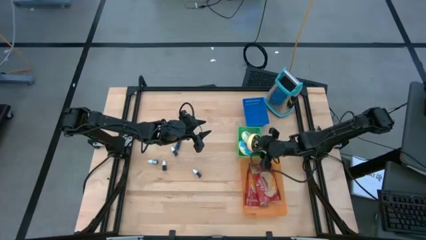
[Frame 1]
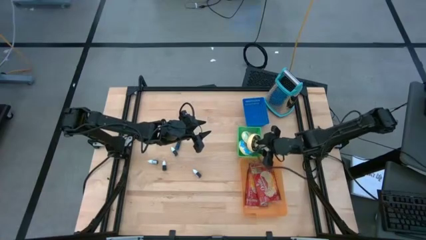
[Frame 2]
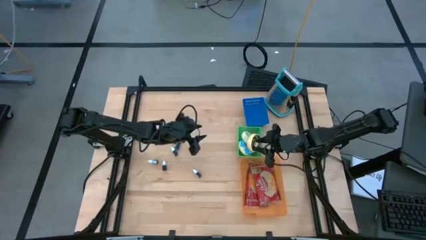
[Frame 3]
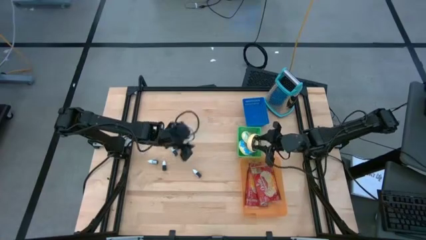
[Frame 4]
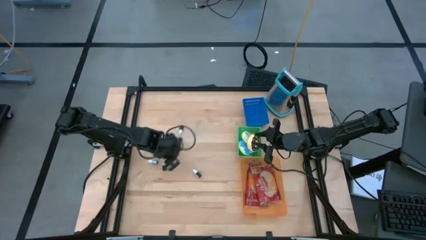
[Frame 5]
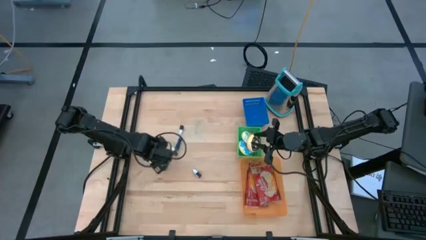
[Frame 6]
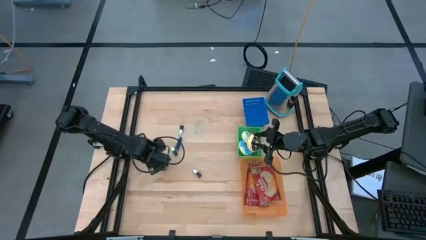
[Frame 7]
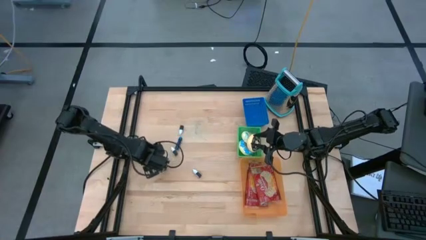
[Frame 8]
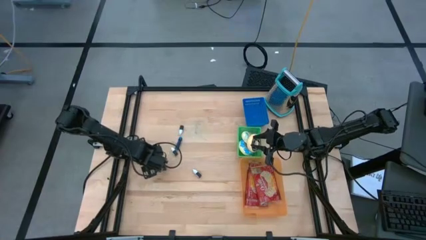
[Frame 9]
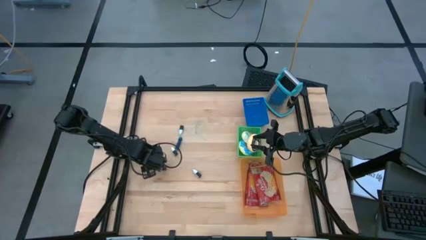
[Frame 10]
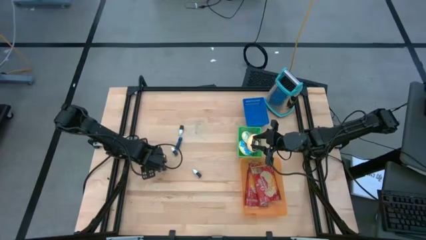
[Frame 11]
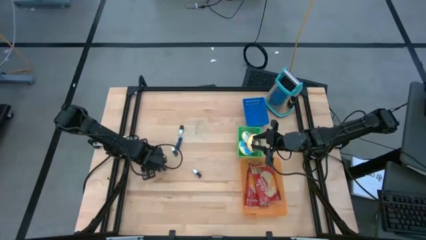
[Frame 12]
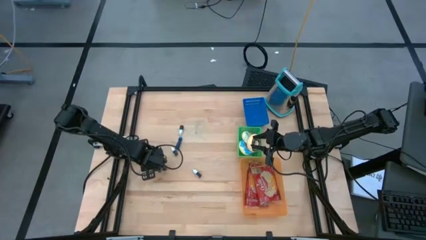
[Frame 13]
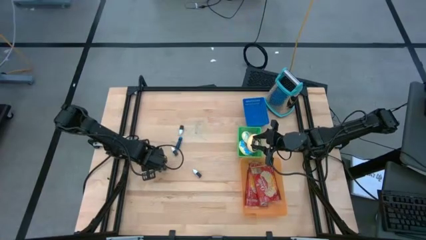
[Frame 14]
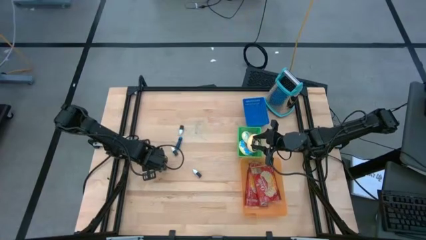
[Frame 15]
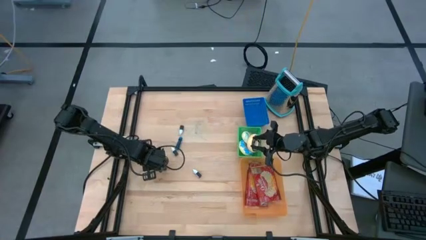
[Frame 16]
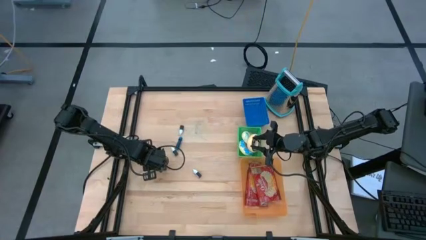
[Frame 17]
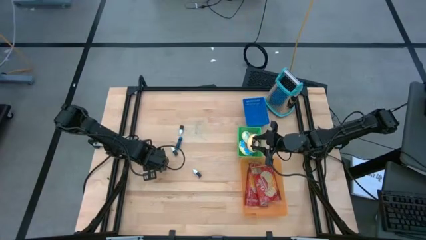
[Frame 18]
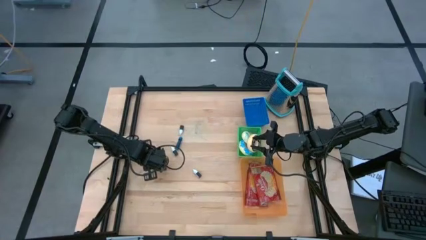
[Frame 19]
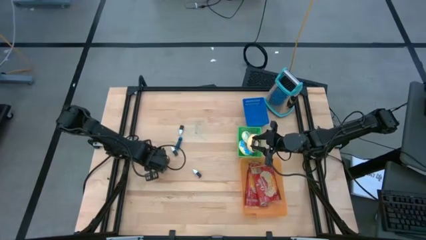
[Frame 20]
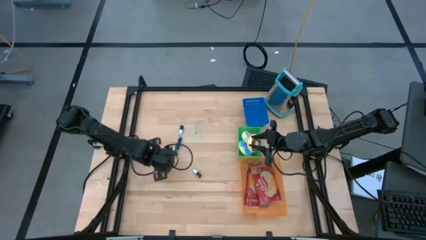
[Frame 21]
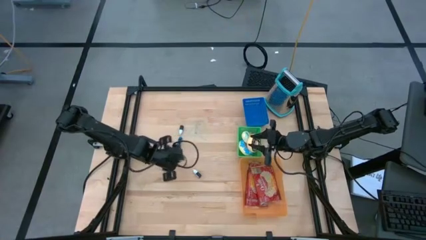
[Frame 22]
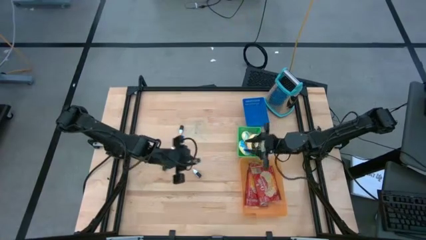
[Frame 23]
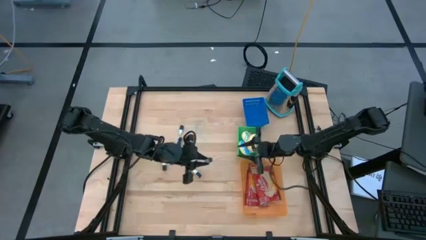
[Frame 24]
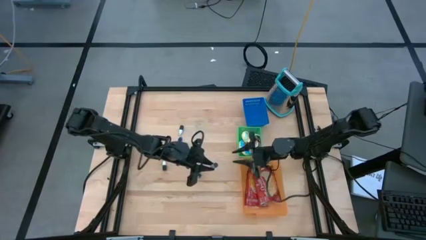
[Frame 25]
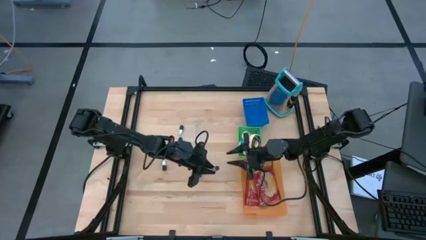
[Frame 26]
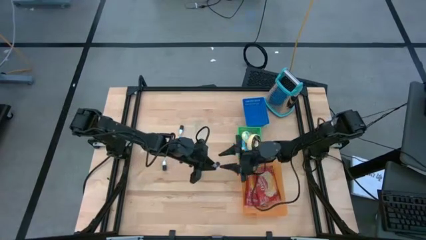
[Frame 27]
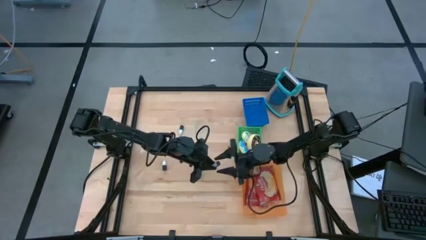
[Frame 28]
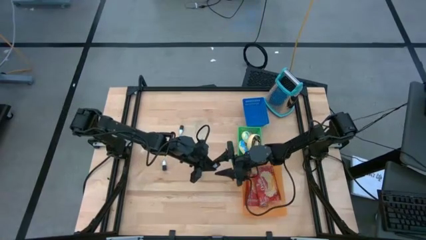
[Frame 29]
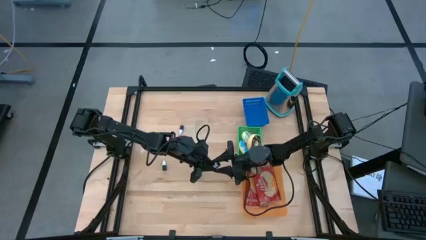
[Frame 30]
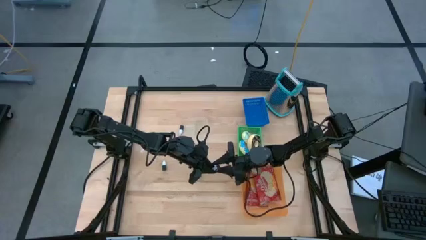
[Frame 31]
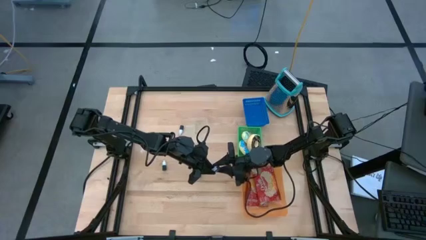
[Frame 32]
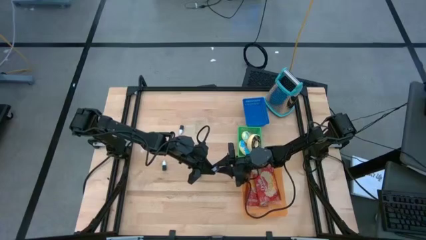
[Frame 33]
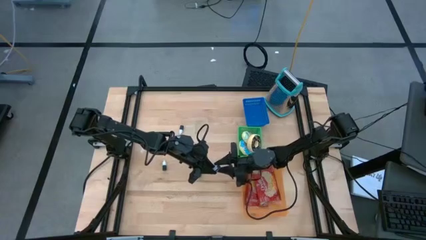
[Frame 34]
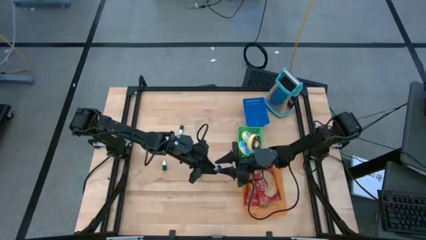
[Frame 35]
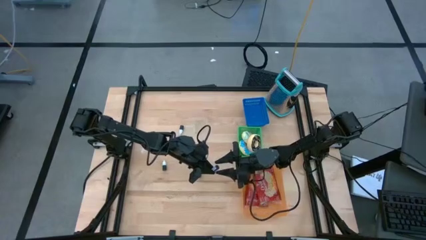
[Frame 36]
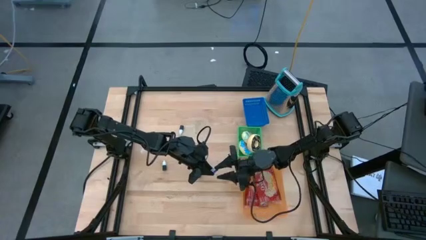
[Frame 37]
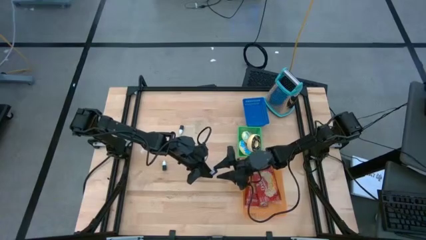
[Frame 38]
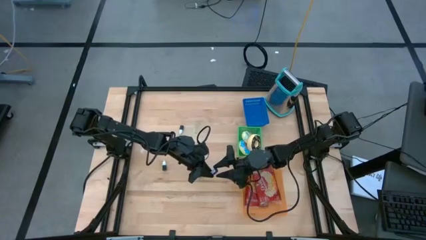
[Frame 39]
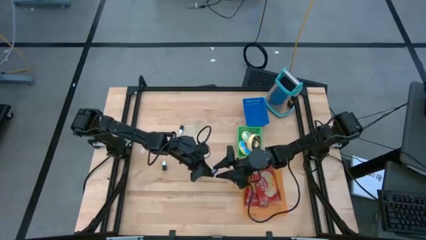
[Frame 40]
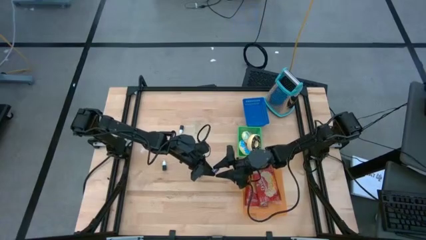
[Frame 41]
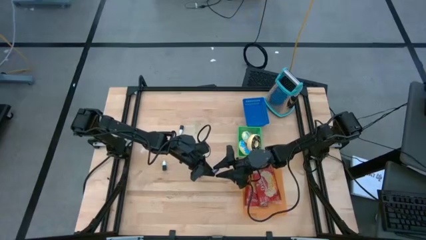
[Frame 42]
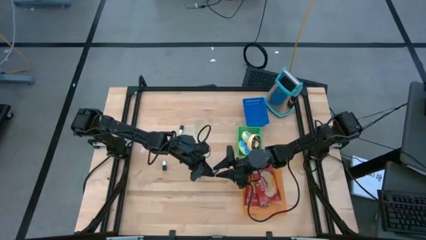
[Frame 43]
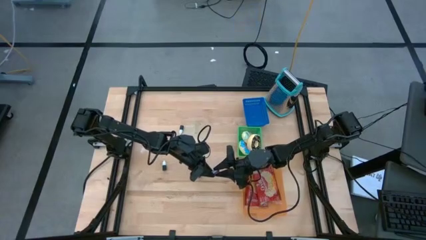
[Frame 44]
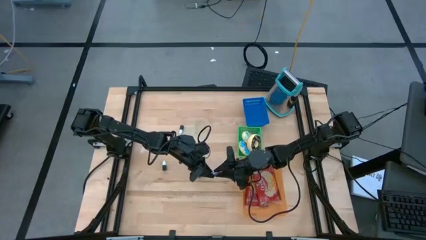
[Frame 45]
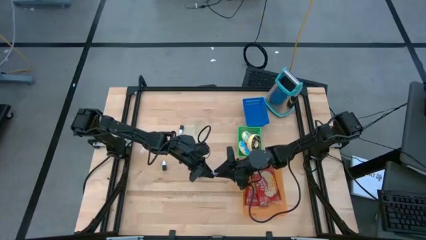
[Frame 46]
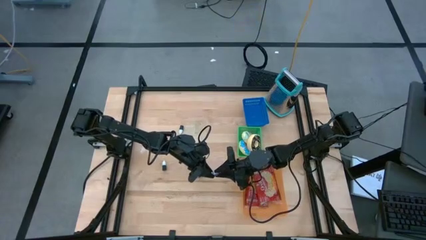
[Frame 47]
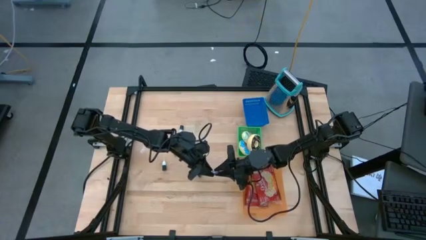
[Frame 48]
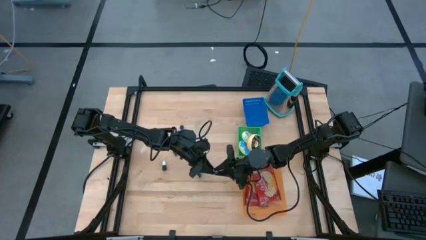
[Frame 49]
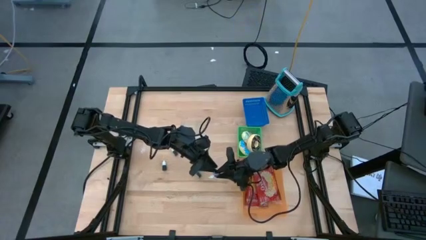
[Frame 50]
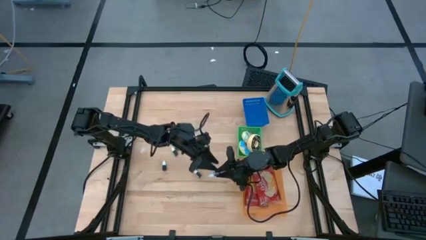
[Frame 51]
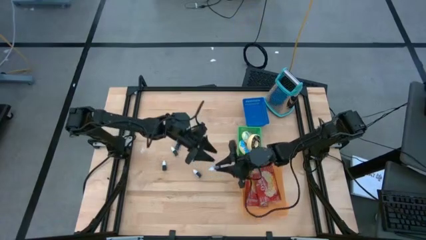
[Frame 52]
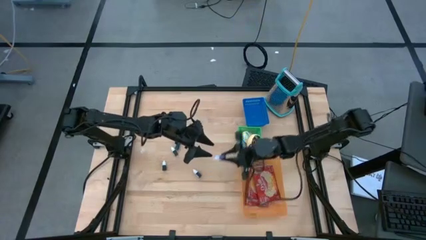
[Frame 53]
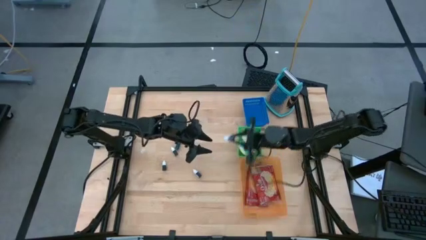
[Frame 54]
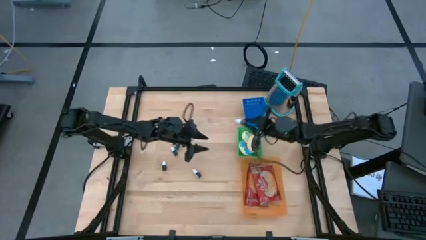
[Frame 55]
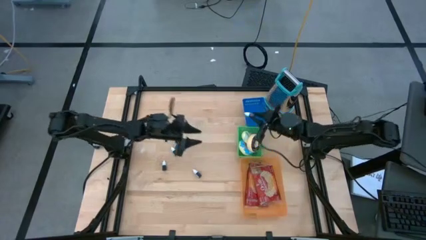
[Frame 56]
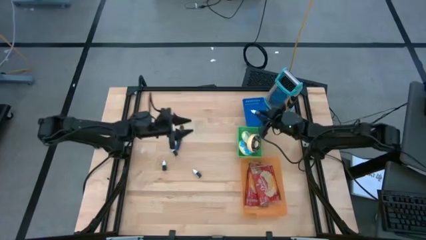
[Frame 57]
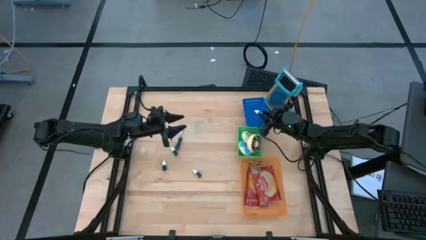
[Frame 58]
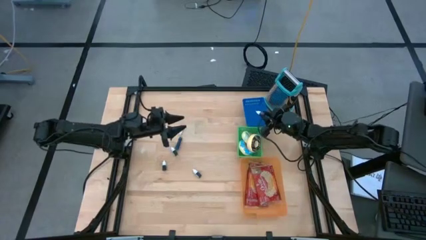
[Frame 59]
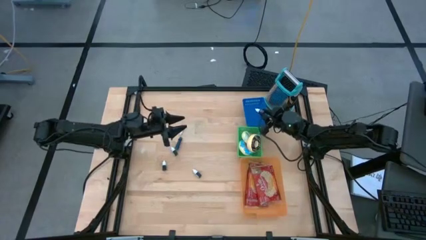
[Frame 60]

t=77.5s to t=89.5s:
Put the purple food coloring bottle into the blue bin
